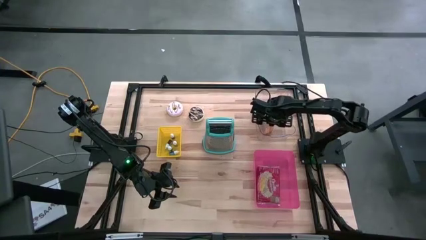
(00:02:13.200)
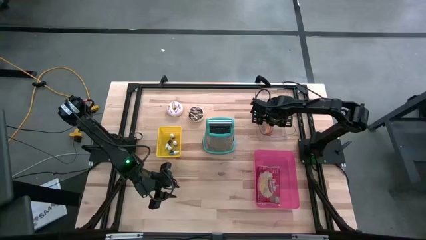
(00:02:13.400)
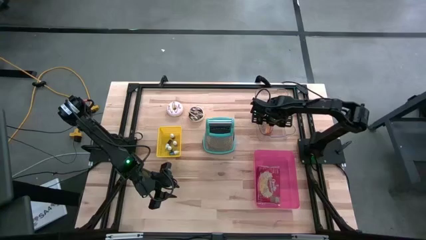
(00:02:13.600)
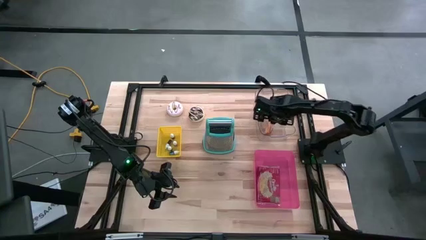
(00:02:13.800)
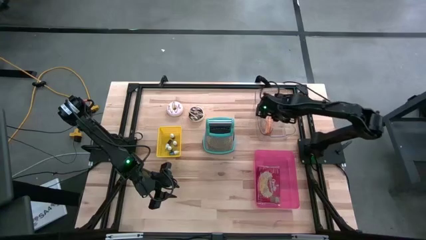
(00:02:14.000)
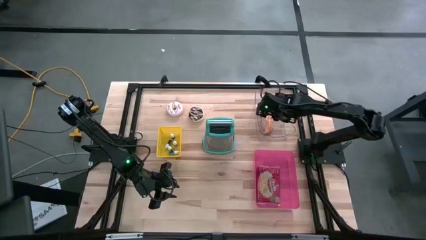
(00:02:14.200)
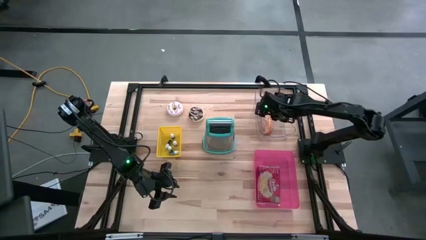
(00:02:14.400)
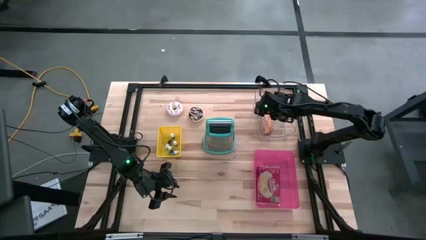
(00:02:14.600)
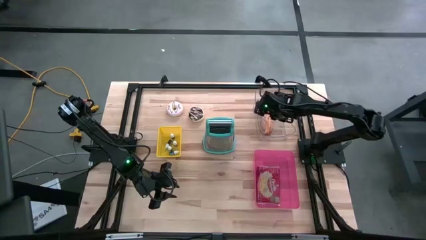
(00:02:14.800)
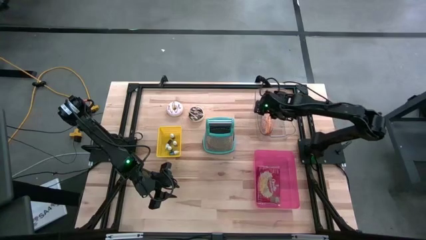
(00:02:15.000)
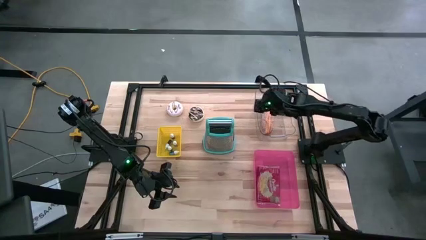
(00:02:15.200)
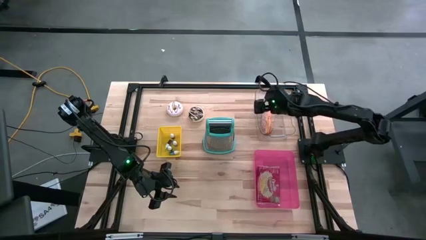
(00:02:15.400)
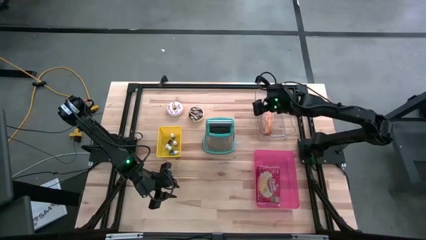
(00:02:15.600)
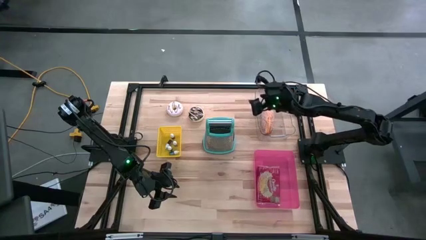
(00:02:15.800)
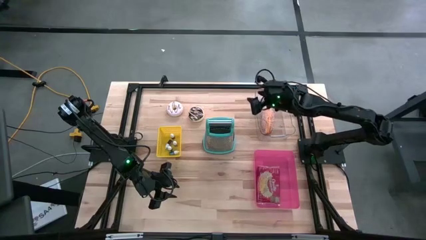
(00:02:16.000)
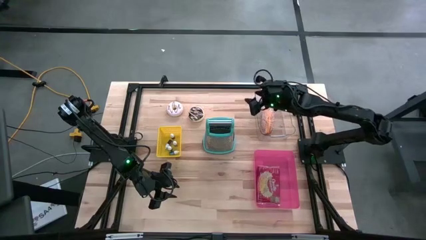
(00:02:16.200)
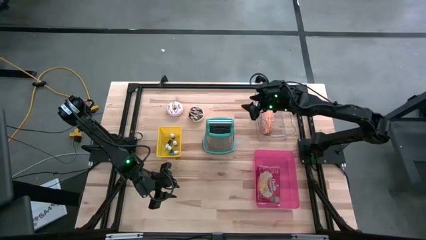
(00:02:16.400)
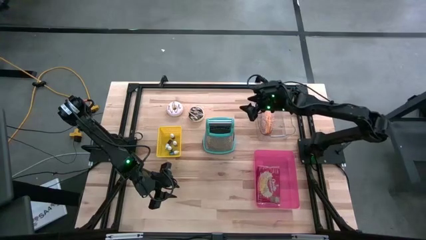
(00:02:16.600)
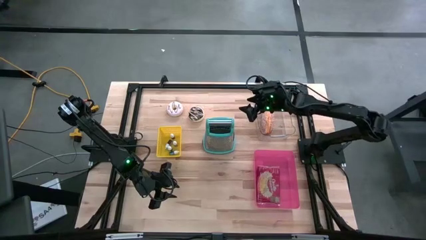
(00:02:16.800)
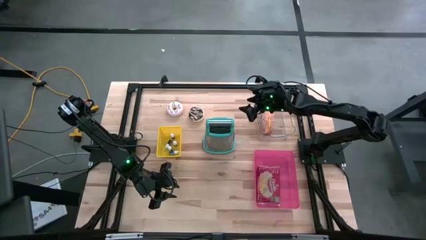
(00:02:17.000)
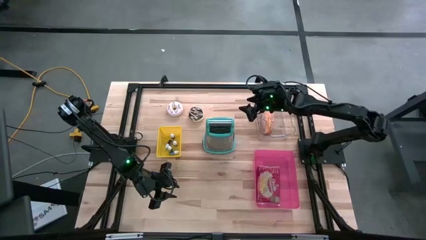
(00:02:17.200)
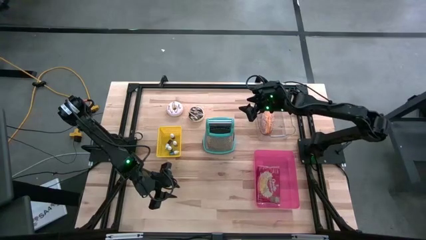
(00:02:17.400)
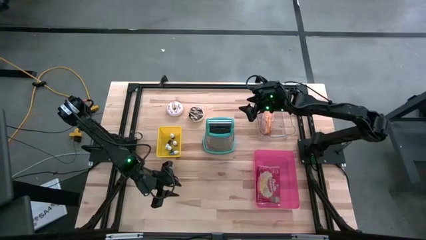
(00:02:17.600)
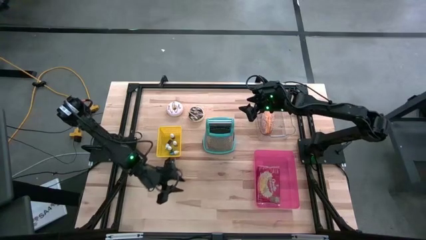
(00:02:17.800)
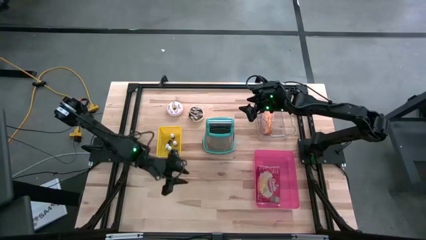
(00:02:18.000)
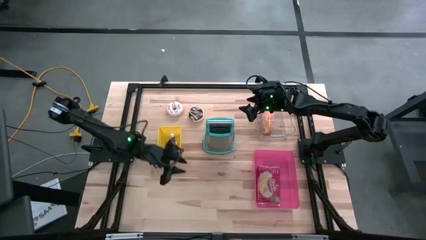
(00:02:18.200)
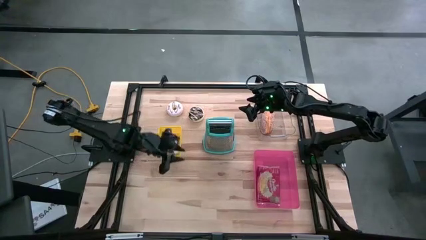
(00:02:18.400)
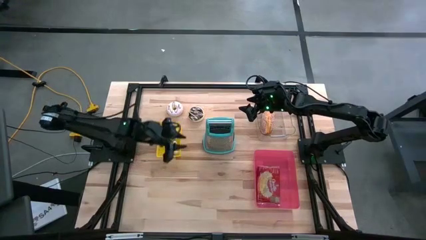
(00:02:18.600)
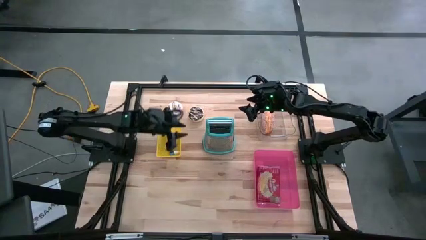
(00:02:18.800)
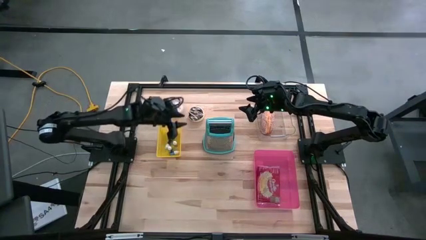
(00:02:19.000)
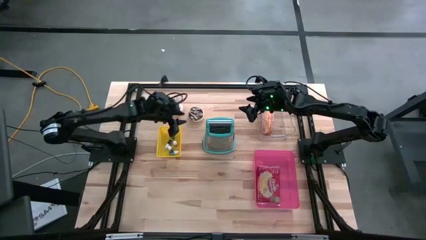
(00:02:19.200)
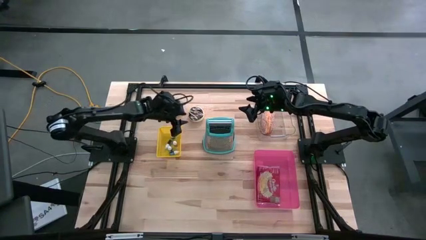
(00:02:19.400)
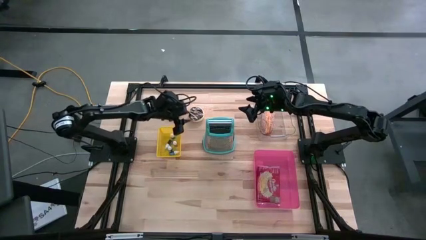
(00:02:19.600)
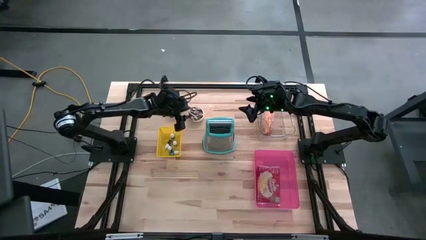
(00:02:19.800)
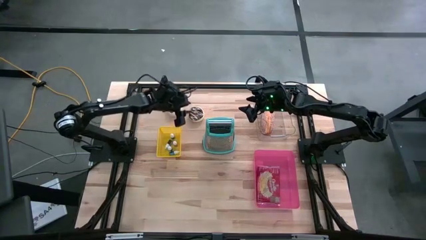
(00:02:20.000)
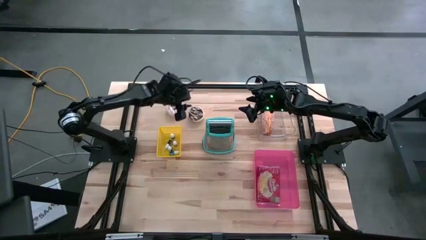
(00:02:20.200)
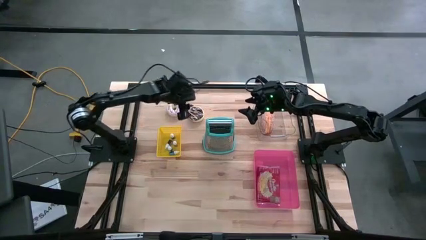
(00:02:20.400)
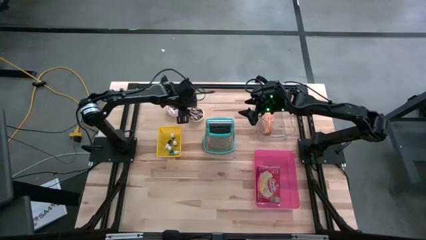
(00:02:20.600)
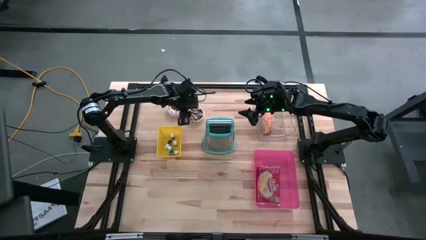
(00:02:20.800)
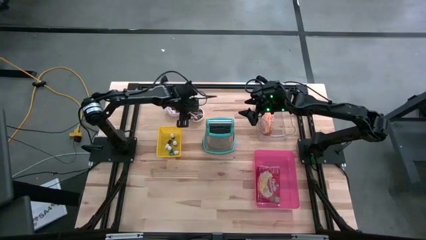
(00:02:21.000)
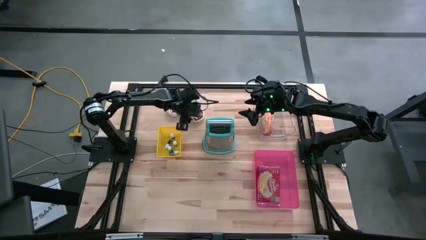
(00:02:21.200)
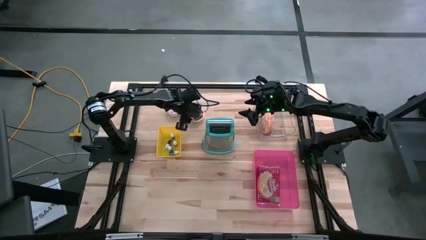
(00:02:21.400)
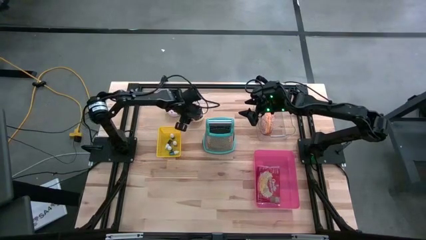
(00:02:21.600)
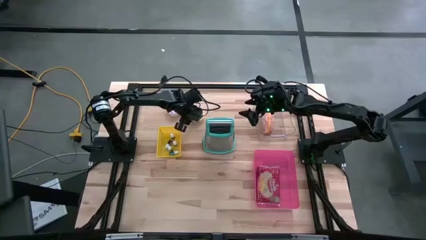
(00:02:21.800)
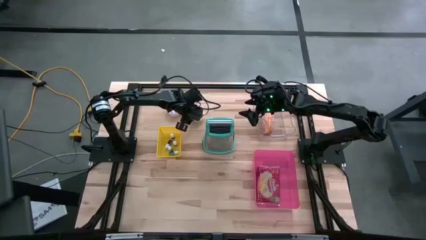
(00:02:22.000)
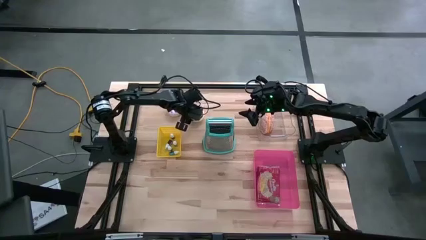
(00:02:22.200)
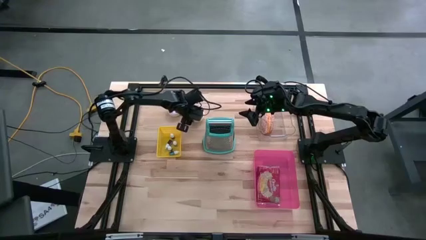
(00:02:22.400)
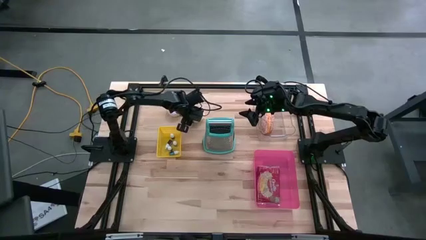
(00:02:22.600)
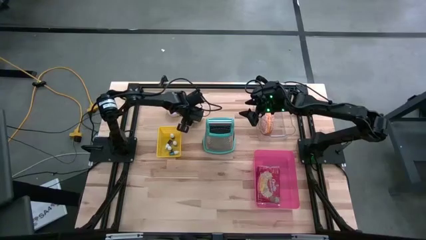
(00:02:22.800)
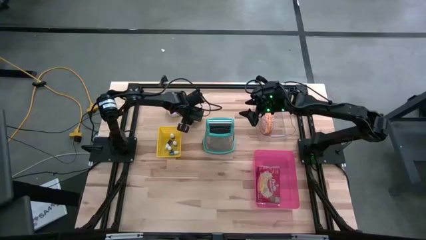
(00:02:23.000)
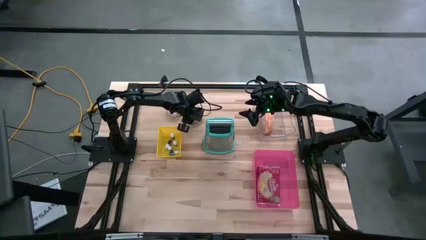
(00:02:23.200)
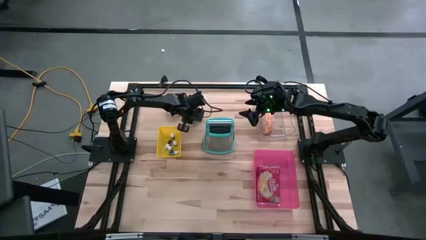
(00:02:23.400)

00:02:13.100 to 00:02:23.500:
Put the dark brown donut into the transparent bin

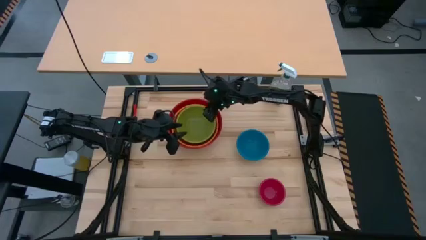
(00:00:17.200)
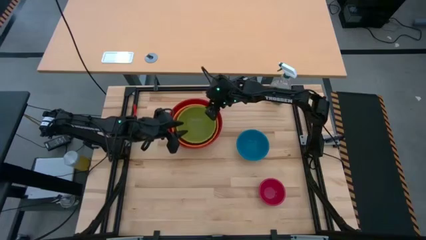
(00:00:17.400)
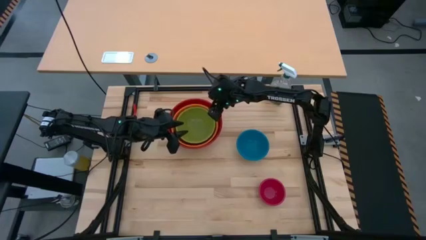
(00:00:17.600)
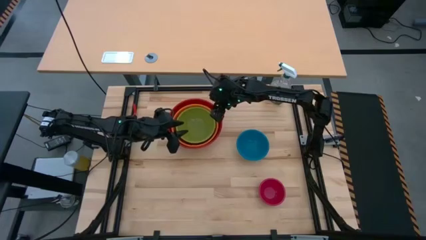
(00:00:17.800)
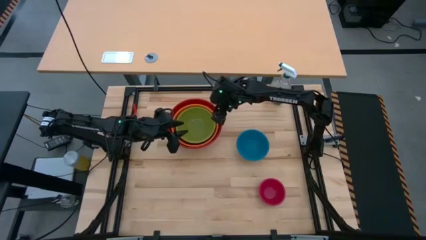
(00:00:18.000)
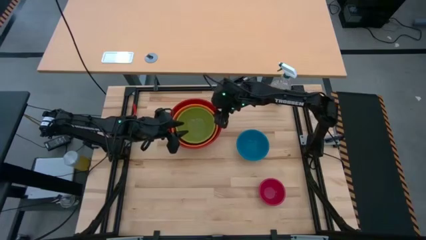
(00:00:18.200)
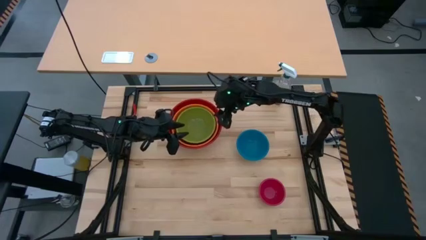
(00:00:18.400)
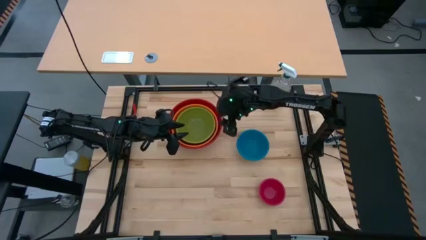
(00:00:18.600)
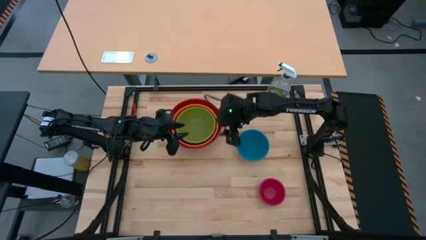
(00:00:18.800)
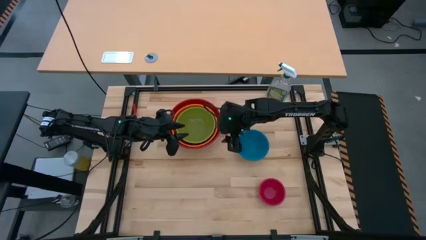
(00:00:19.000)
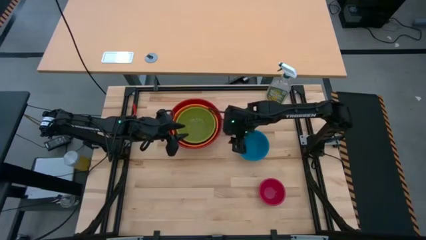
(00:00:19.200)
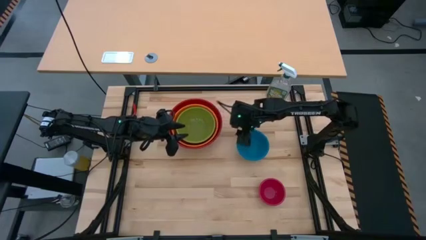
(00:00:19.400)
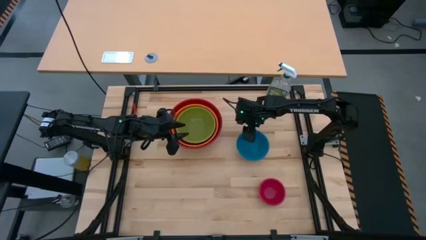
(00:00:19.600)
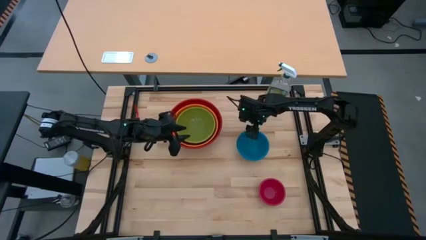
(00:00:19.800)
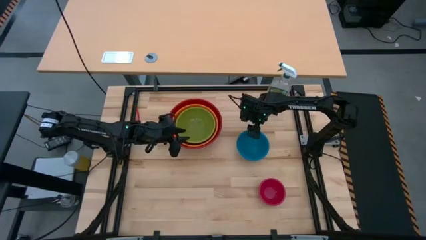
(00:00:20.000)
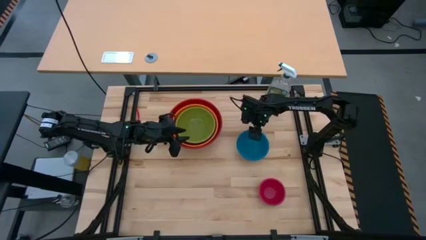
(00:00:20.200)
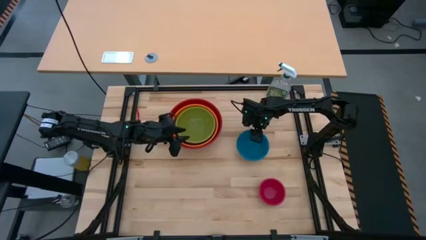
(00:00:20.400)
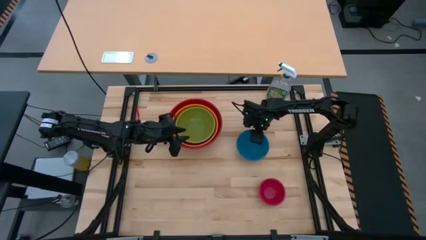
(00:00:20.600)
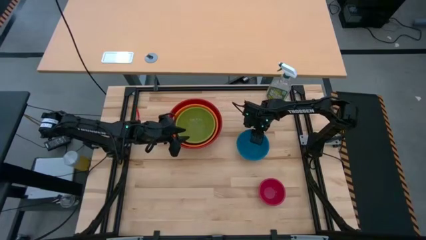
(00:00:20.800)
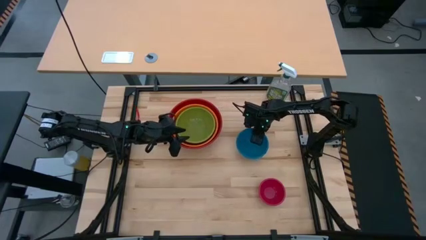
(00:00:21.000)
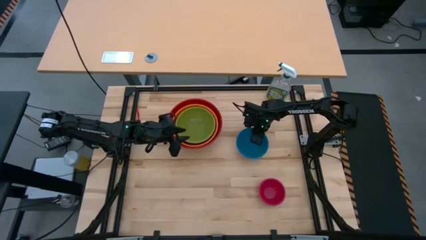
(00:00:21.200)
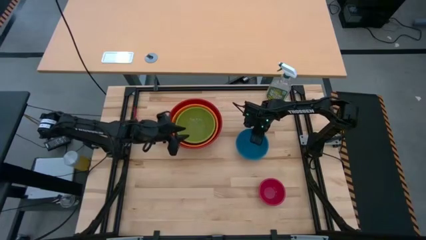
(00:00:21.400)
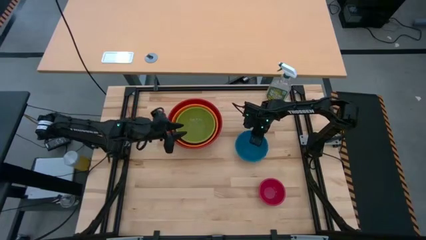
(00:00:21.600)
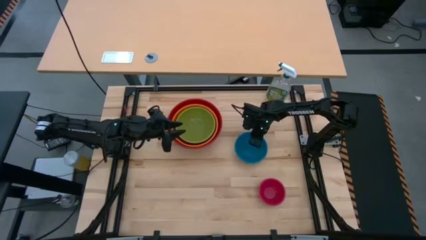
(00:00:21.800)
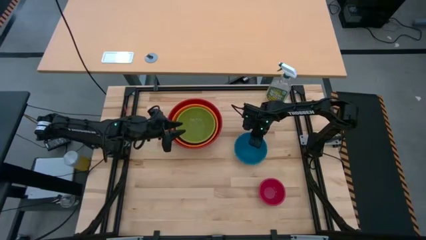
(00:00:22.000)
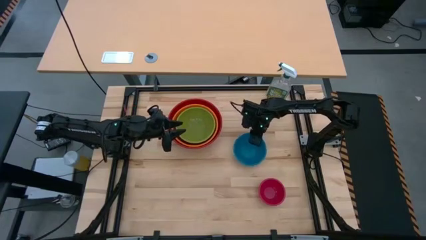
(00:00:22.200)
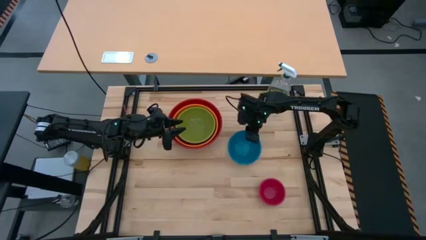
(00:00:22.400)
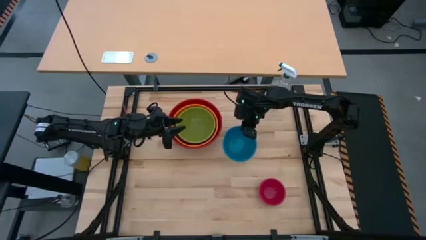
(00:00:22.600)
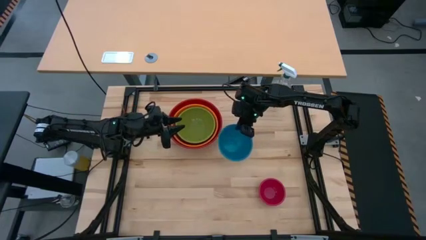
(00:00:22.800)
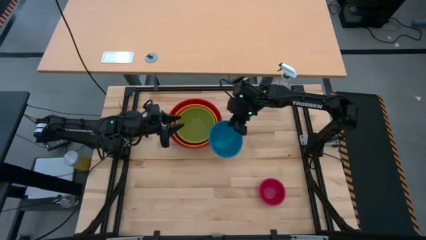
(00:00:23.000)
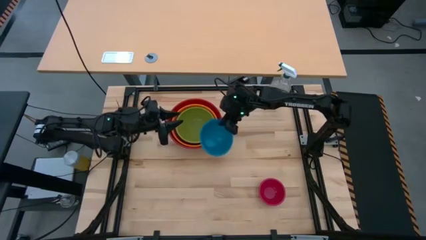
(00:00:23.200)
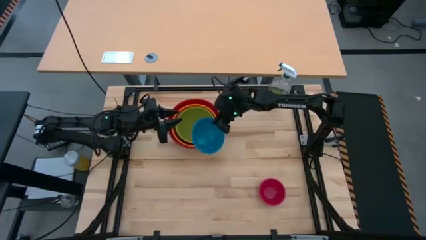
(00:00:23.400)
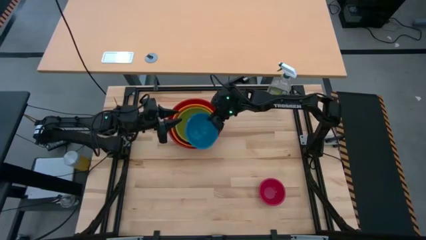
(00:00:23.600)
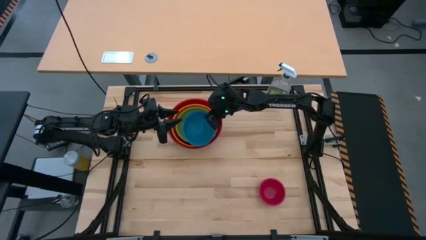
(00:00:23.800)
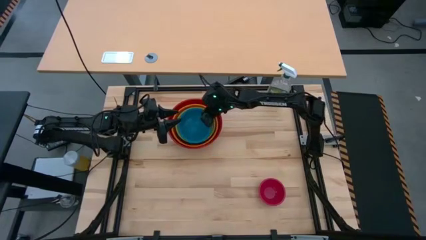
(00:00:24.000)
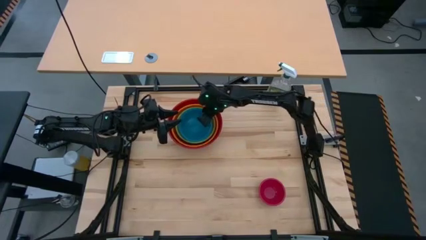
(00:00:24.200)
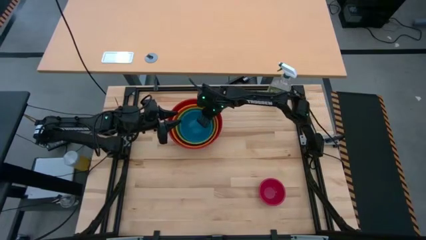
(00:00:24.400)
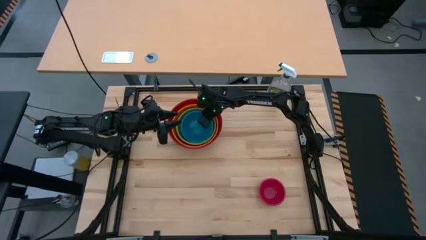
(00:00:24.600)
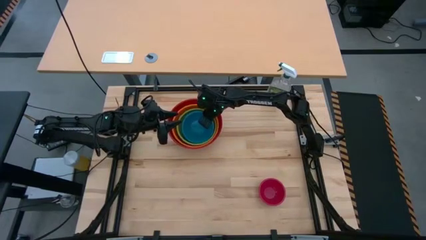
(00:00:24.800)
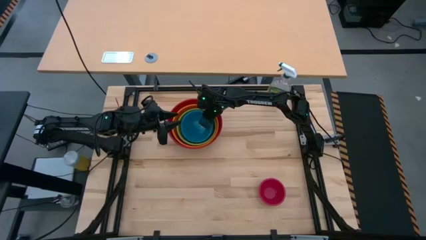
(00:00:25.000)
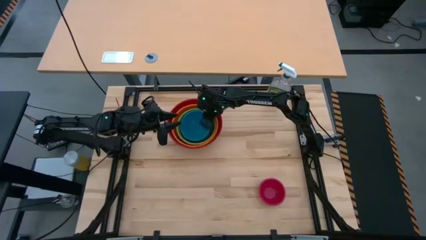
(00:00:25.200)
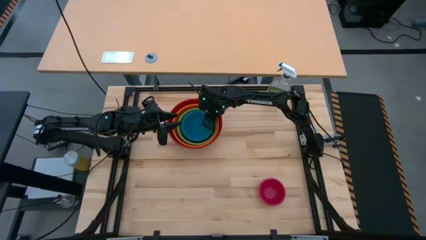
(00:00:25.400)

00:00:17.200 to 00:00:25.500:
Stack the blue bowl on top of the green bowl
